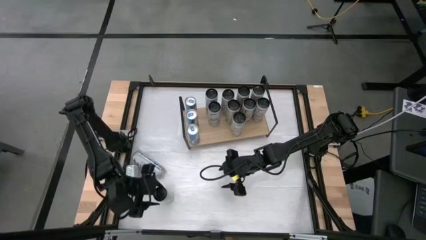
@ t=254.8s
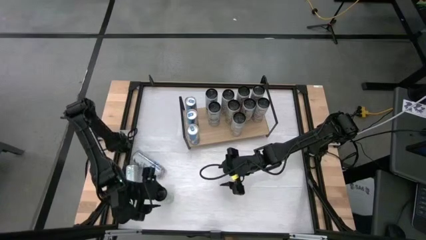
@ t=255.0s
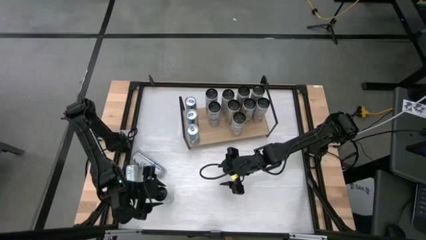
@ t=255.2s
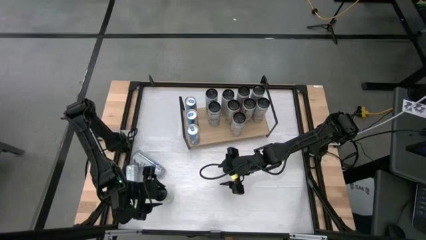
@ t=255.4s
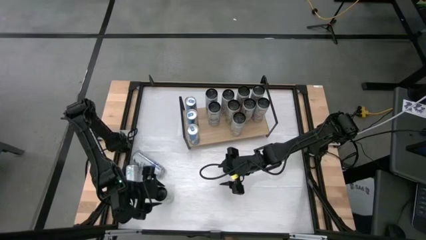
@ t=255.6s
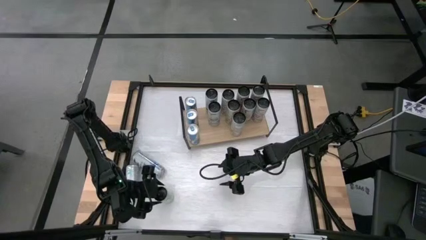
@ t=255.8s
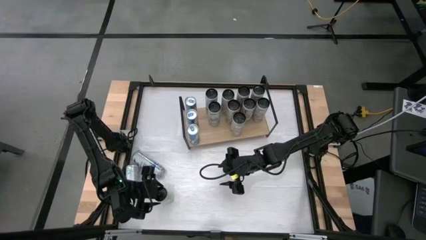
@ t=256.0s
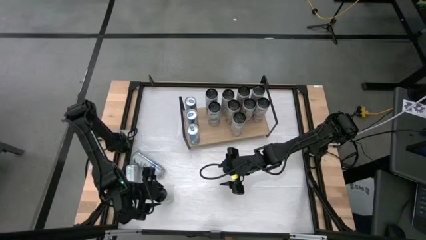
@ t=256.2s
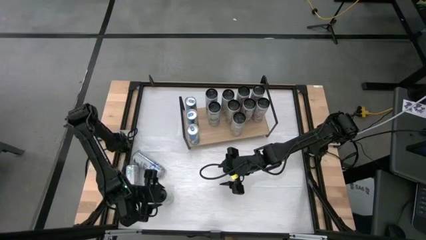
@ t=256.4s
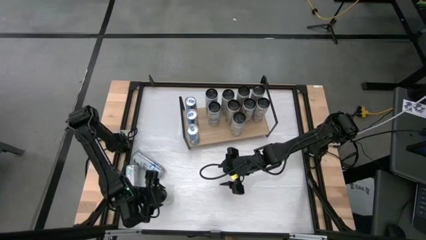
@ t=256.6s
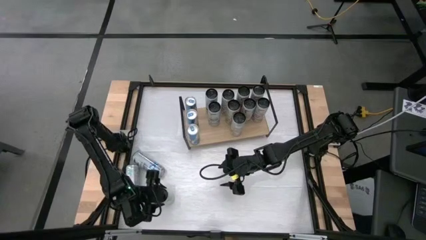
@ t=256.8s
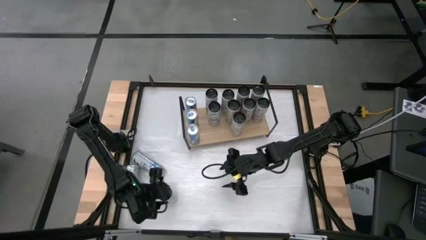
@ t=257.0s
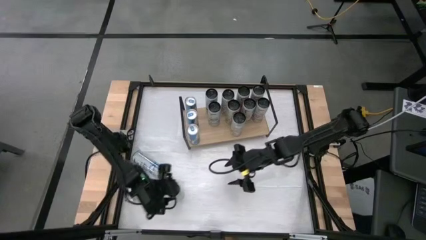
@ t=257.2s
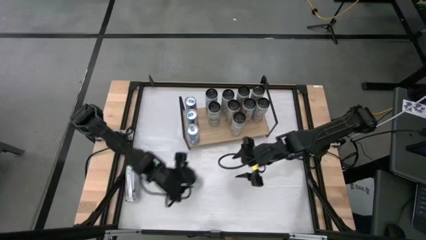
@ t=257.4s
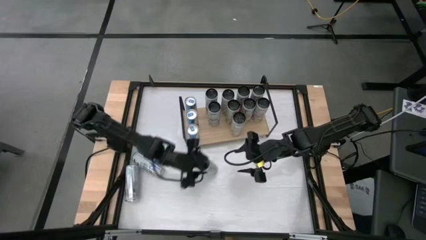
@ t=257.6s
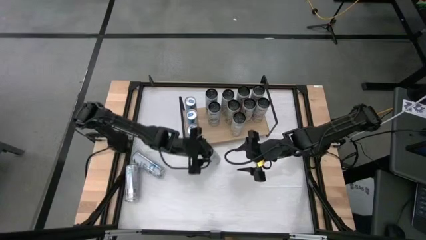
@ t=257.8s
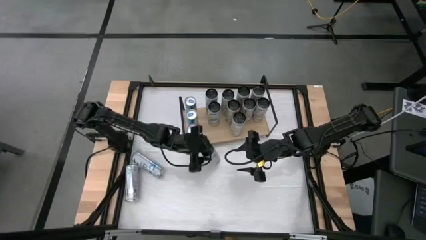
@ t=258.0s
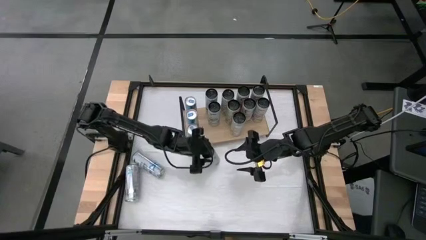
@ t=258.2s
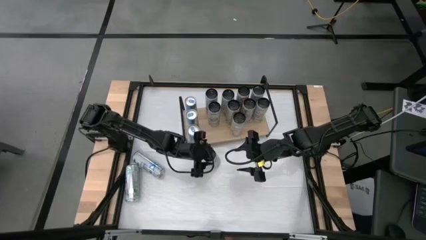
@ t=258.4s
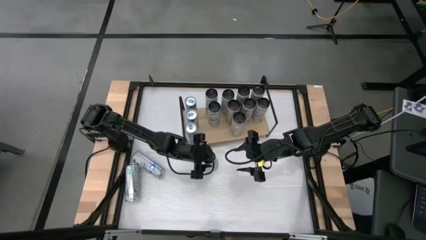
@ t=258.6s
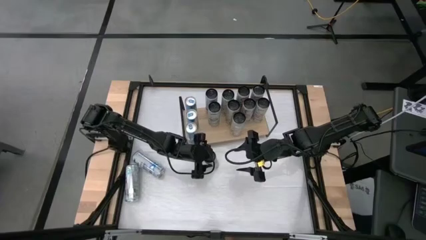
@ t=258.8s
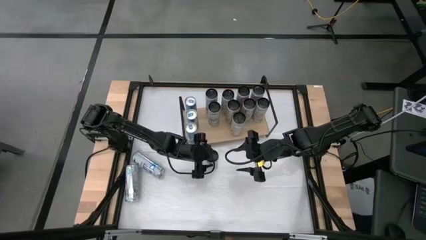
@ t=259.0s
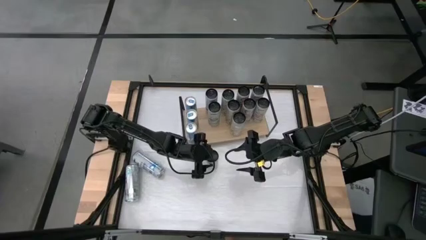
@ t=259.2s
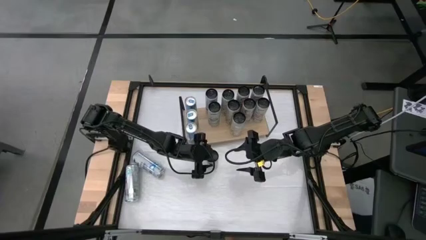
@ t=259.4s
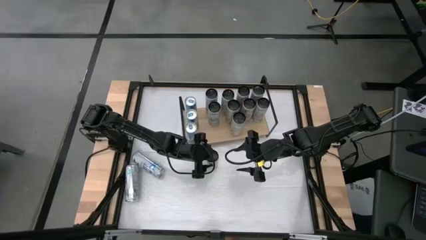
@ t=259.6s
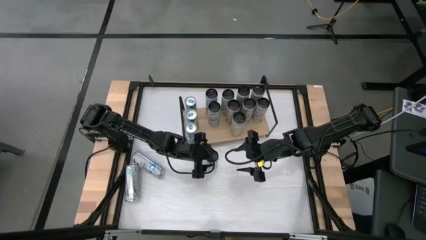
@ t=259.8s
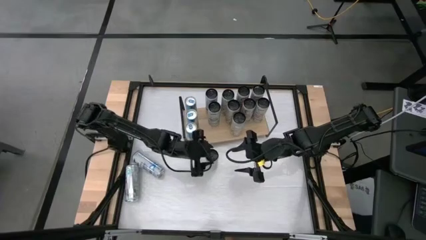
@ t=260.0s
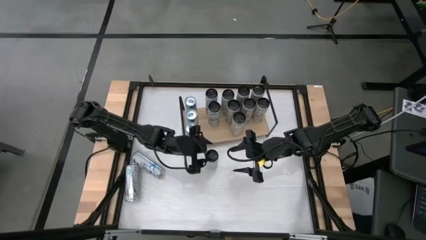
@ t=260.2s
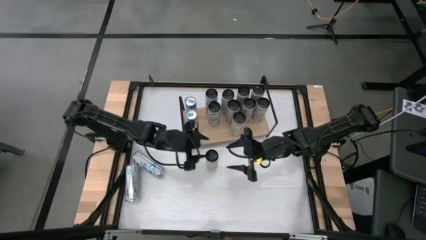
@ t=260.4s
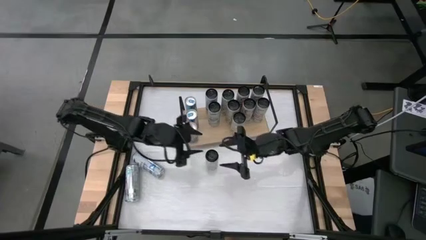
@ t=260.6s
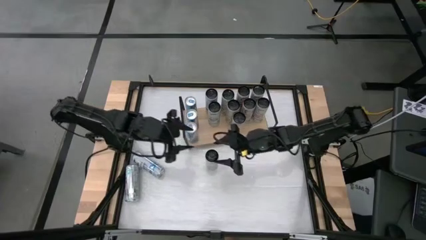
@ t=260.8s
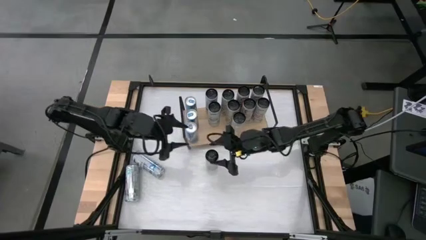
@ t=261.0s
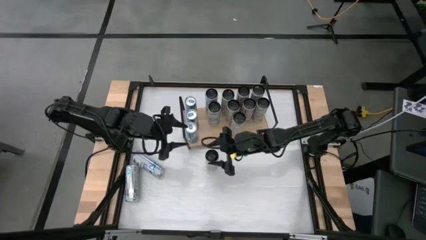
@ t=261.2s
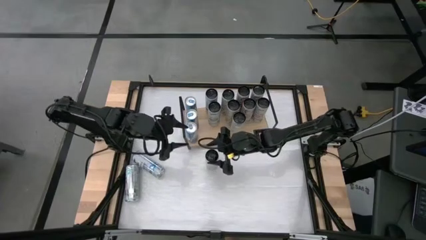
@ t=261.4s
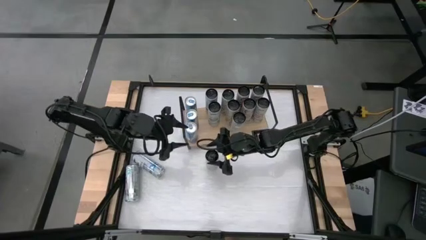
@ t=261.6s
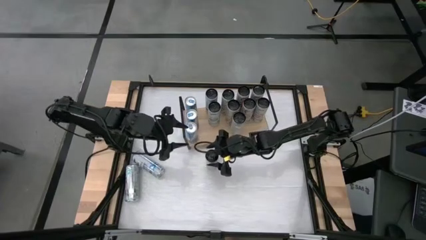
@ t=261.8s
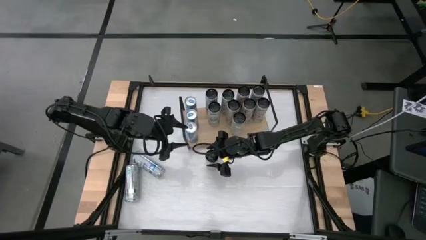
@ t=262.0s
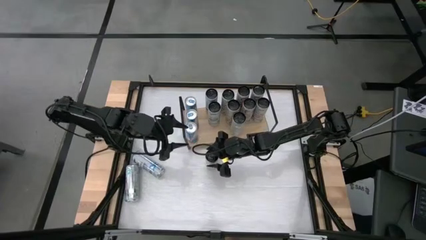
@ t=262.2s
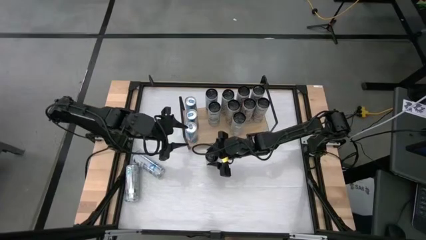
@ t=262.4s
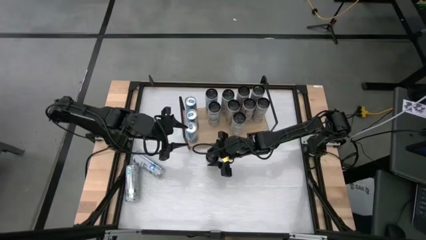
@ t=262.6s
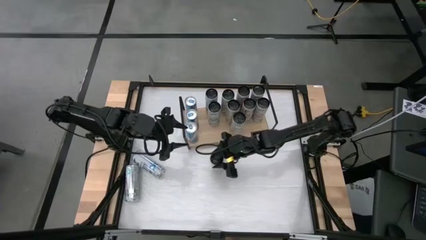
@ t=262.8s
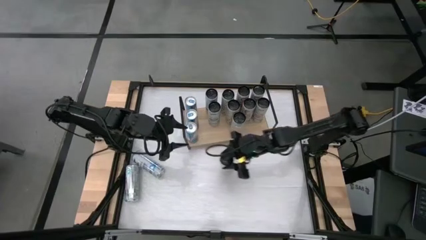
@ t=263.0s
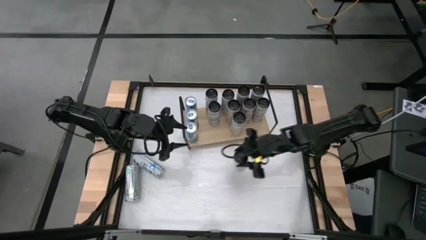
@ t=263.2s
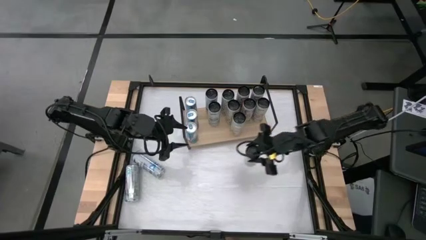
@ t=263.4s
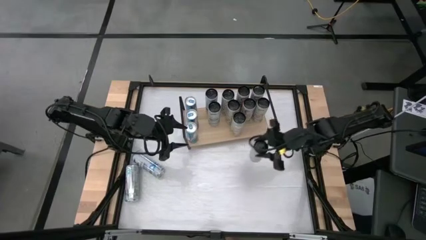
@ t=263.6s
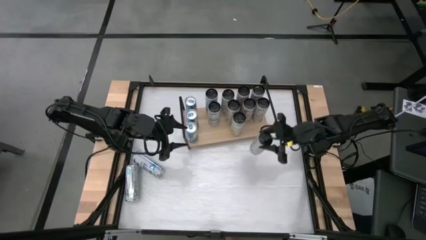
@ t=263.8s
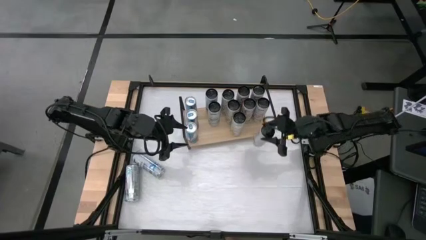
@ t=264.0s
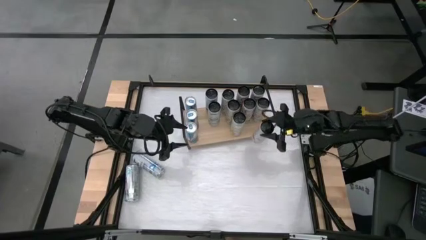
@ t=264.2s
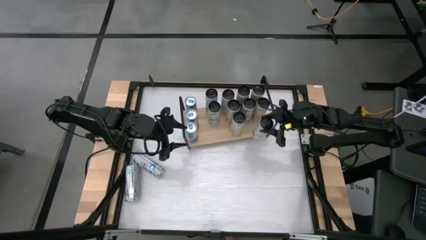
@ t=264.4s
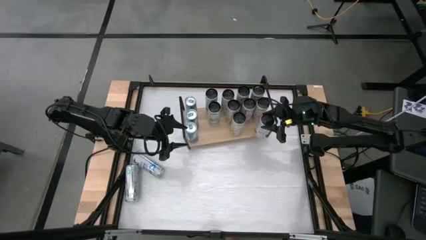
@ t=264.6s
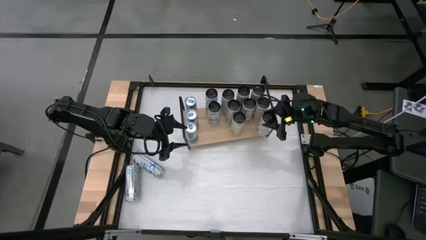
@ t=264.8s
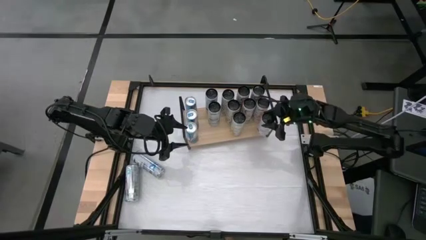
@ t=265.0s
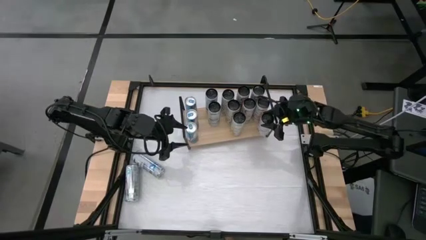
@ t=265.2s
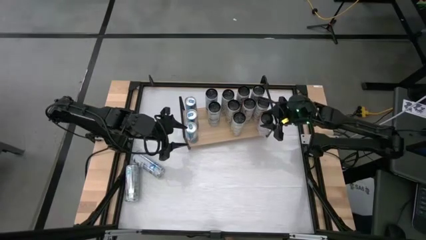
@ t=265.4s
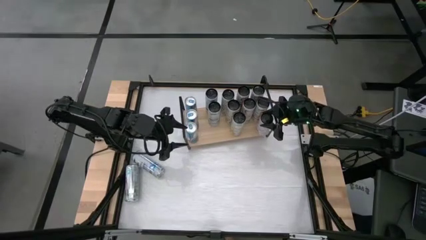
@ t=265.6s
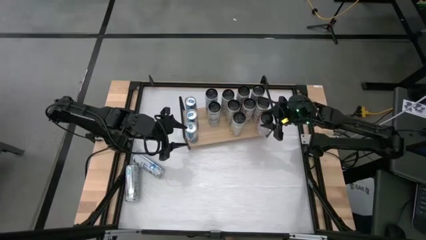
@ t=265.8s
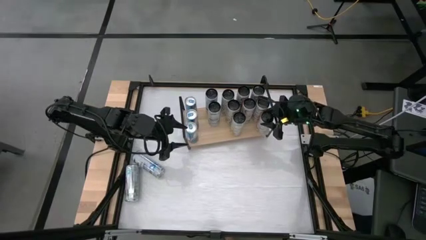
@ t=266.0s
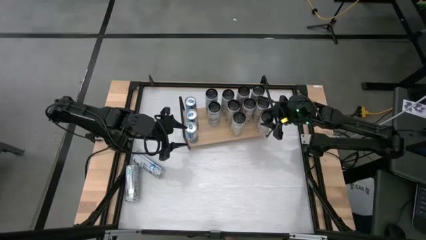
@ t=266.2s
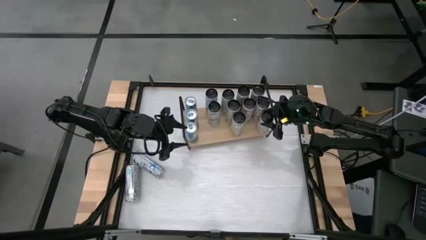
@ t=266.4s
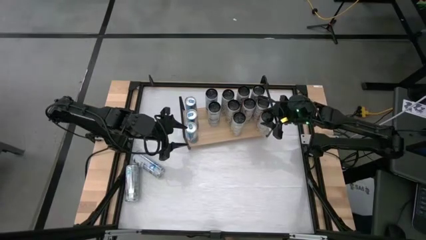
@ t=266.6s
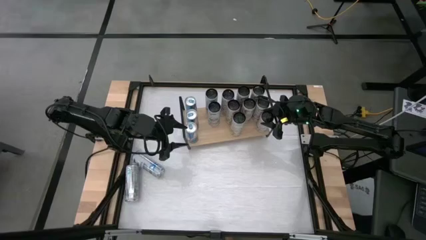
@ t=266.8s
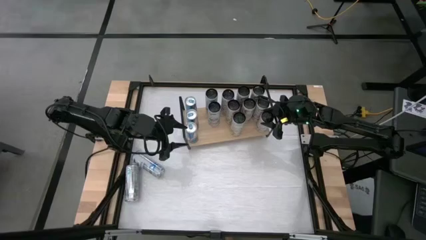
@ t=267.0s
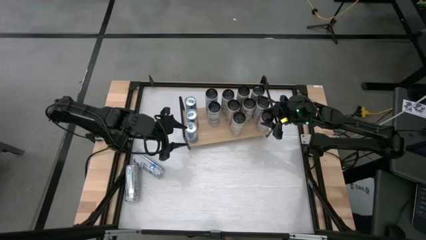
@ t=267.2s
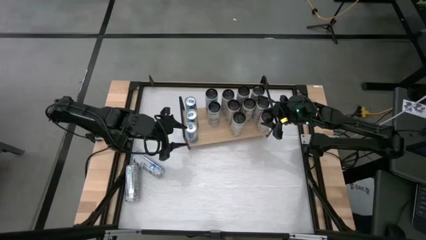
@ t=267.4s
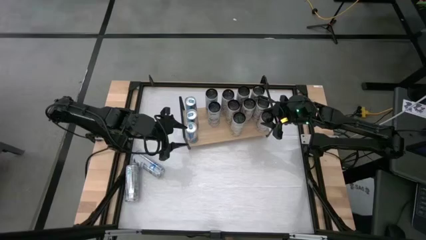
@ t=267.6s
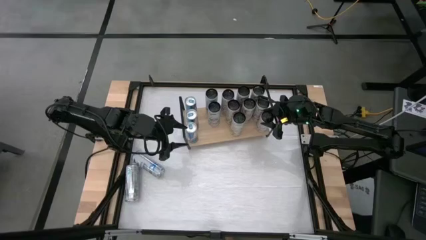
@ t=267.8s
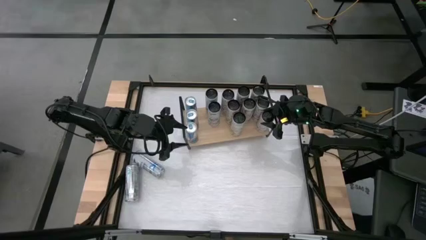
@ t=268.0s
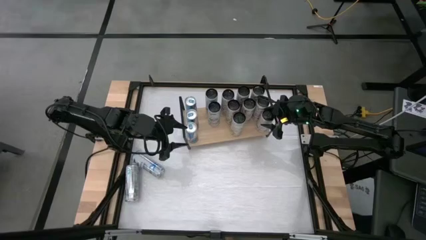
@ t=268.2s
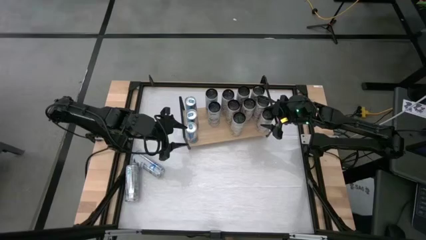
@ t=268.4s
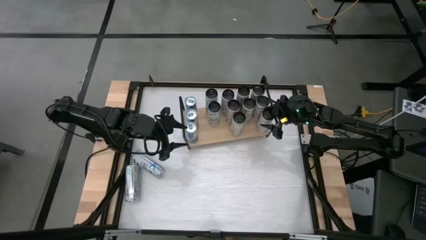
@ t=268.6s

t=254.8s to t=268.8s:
Task: Place canned beverage on shelf
Put the white-pink soda can on the shelf aligned with the other white-pink soda can

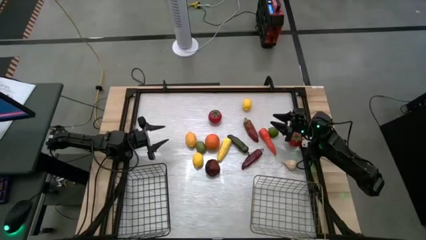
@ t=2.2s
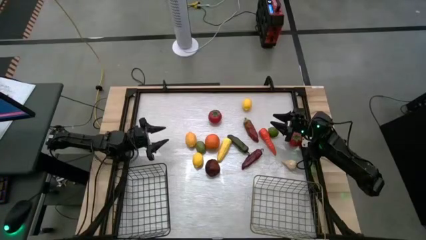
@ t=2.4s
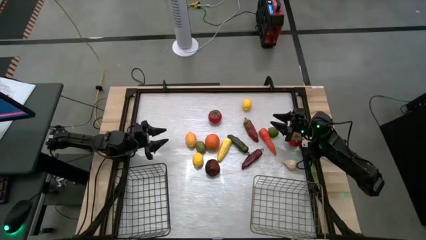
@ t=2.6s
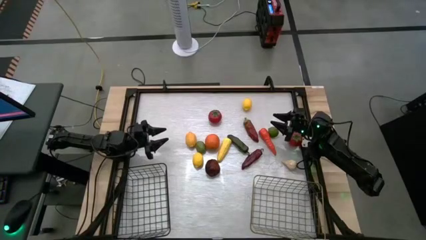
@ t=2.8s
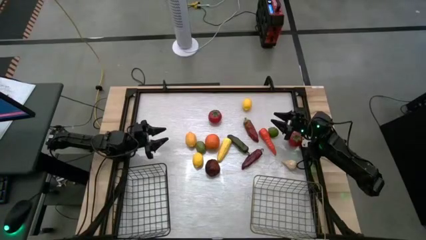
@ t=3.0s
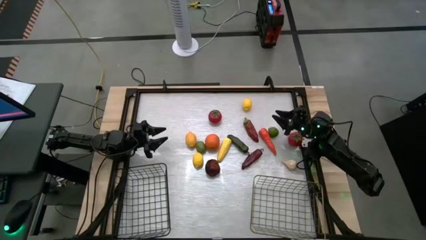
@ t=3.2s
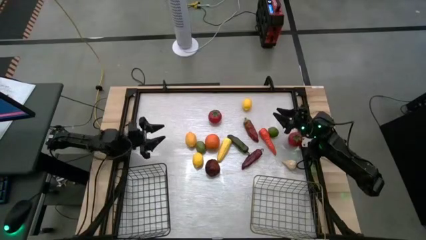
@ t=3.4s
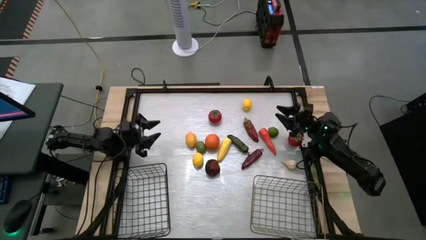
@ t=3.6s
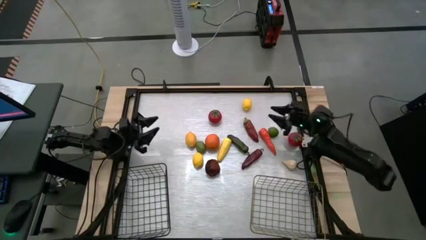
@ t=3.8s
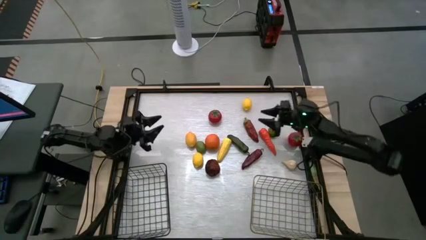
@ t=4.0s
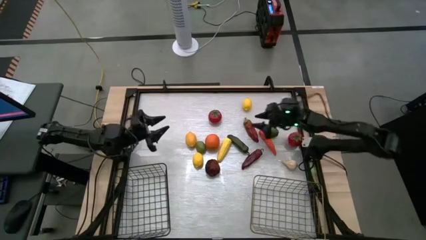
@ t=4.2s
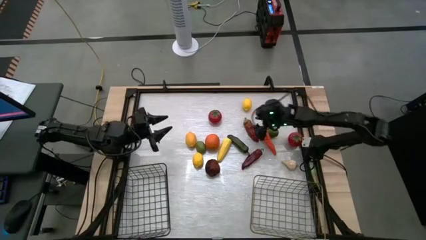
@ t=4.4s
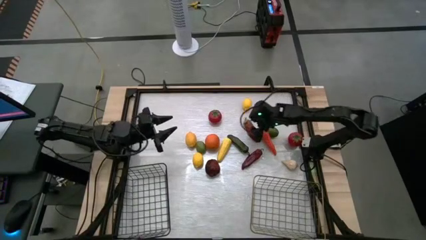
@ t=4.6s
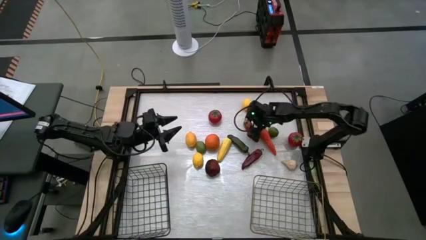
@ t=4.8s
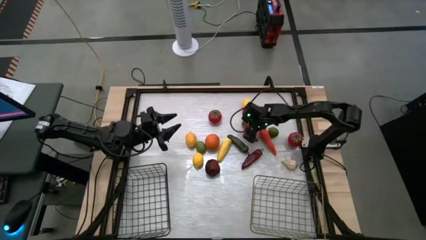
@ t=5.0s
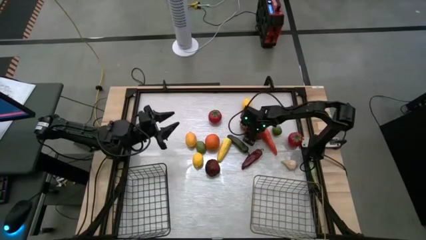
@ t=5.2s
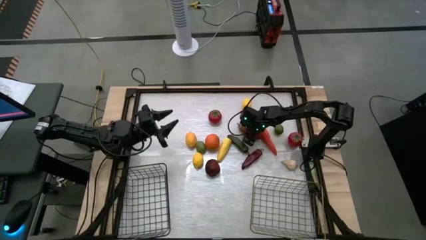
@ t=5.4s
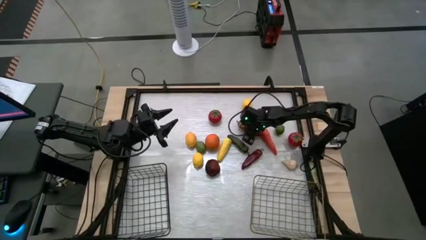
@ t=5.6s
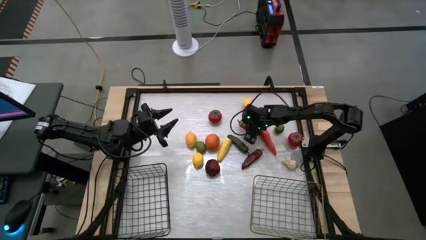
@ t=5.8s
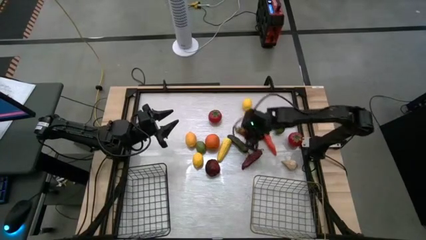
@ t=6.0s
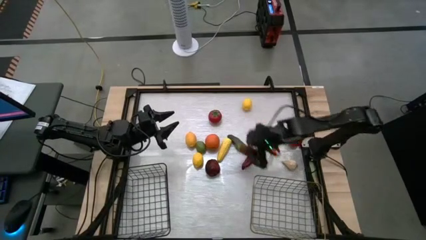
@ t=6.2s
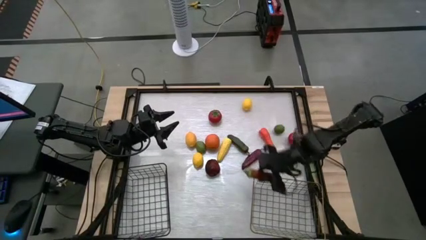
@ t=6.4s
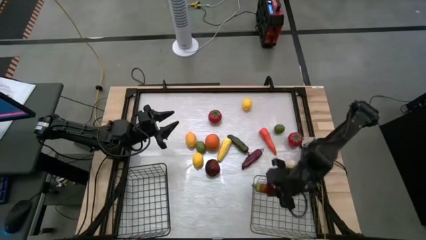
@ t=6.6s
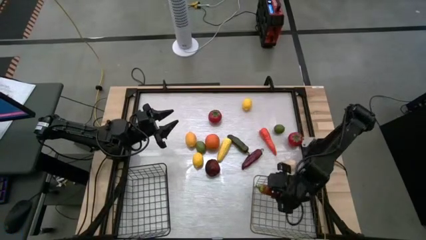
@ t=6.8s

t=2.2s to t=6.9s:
Task: Sort produce into baskets
Put the top red bell pepper into the gold wire basket
